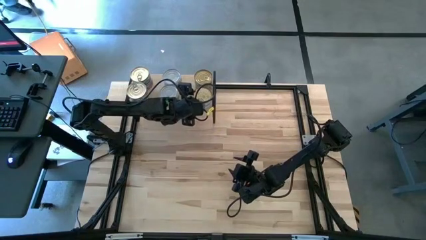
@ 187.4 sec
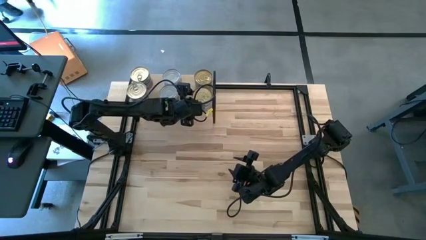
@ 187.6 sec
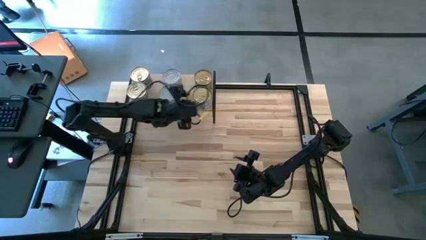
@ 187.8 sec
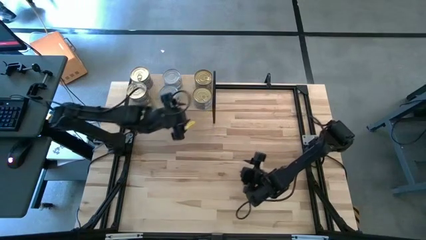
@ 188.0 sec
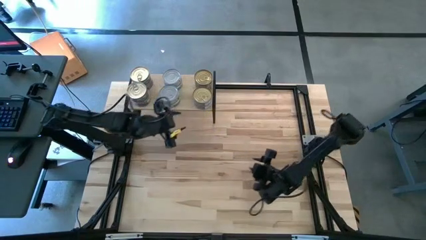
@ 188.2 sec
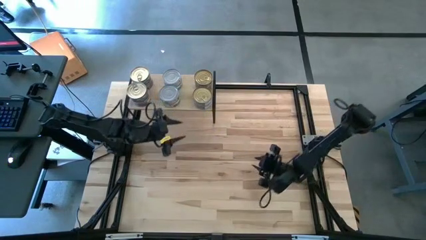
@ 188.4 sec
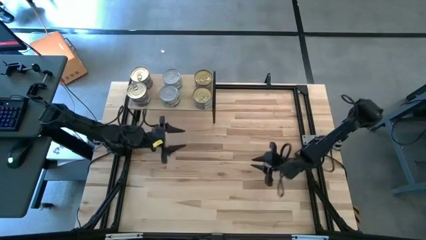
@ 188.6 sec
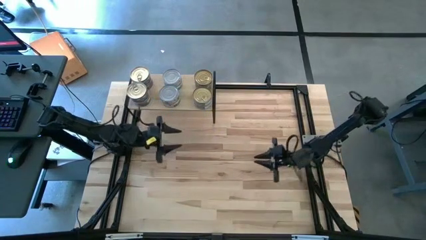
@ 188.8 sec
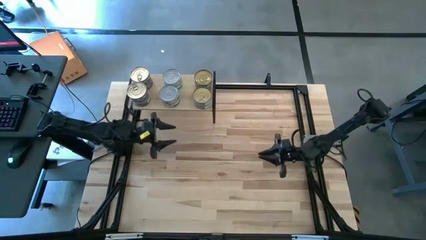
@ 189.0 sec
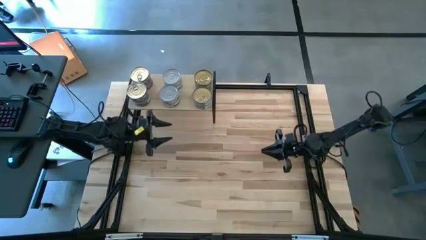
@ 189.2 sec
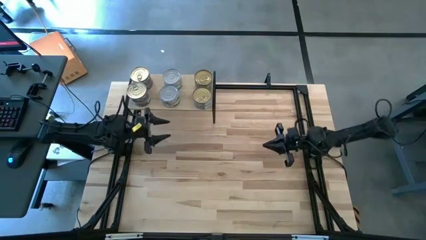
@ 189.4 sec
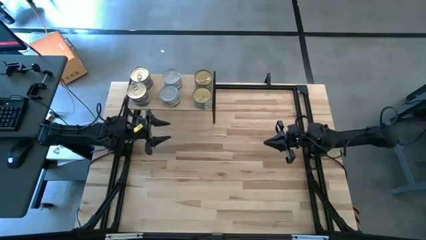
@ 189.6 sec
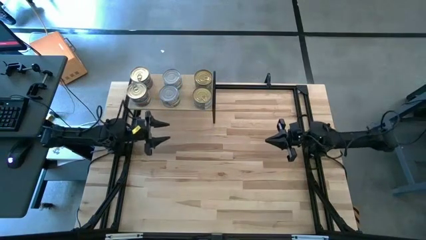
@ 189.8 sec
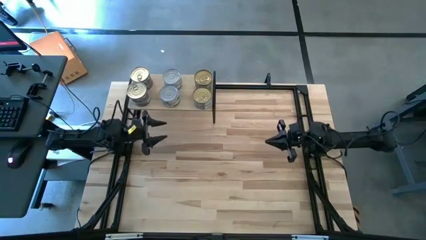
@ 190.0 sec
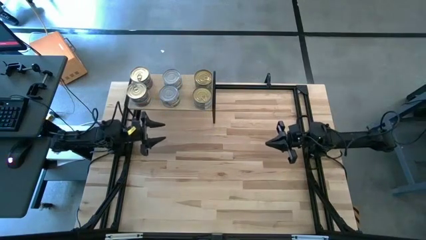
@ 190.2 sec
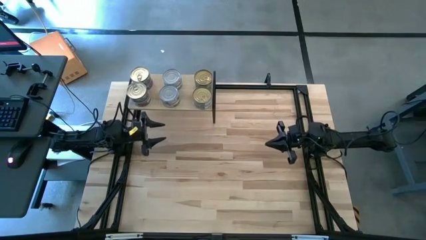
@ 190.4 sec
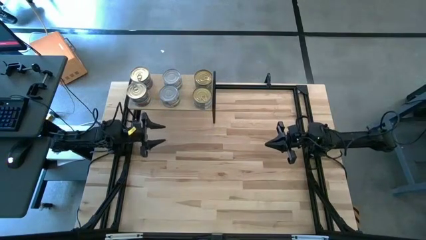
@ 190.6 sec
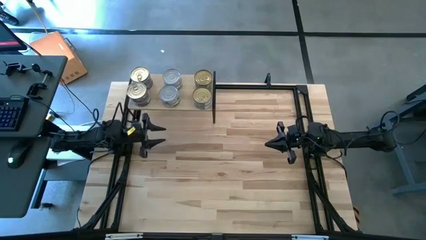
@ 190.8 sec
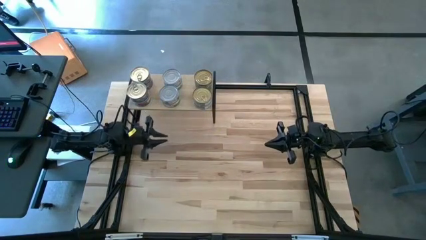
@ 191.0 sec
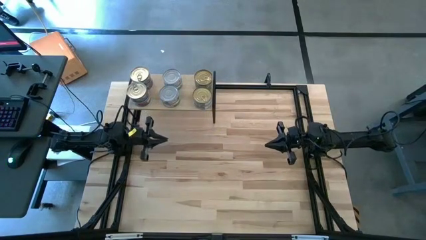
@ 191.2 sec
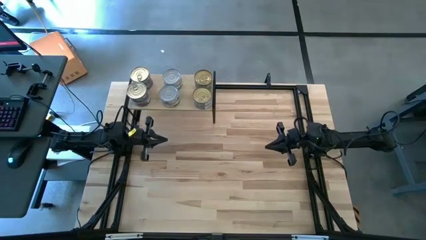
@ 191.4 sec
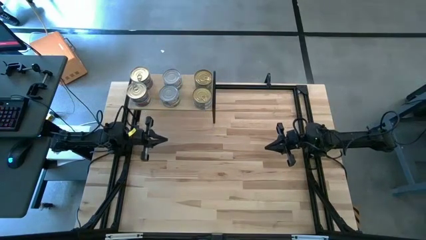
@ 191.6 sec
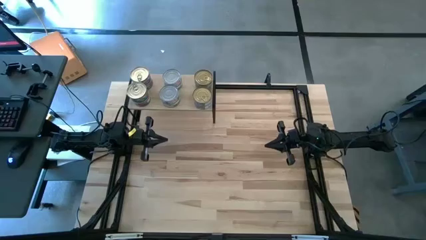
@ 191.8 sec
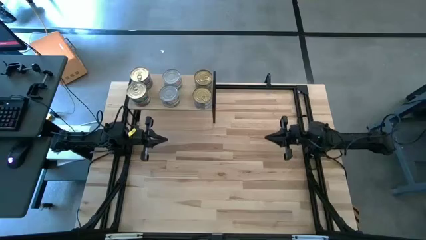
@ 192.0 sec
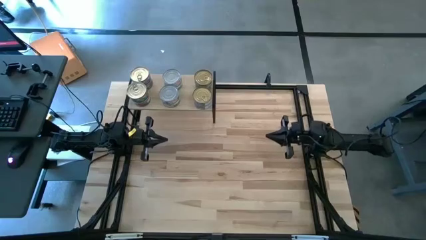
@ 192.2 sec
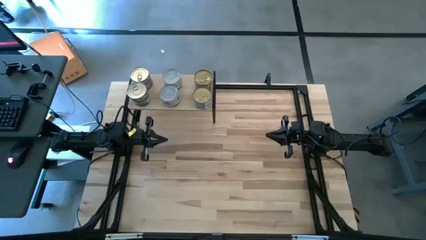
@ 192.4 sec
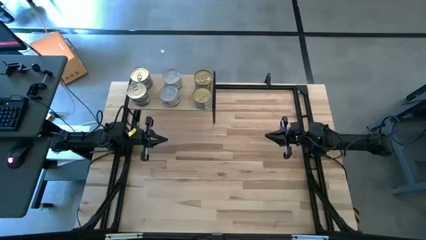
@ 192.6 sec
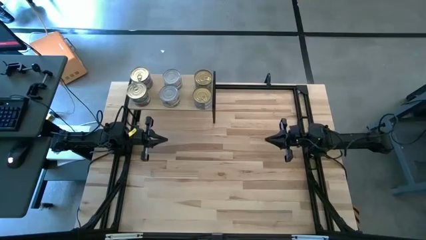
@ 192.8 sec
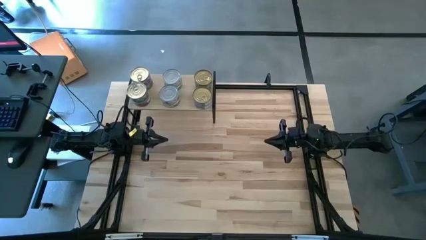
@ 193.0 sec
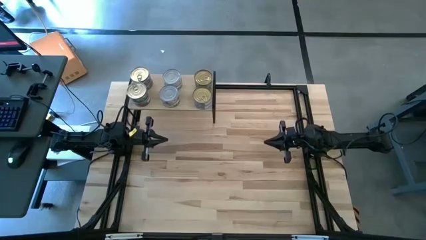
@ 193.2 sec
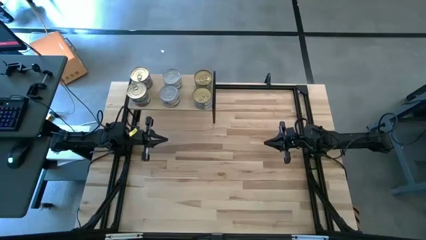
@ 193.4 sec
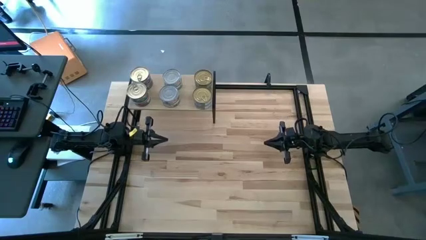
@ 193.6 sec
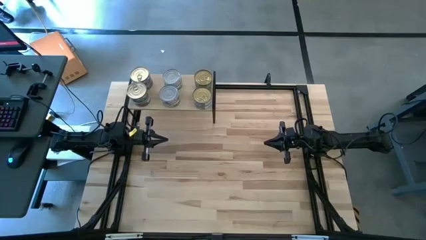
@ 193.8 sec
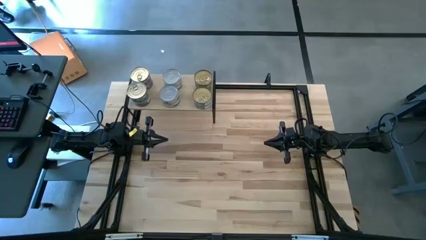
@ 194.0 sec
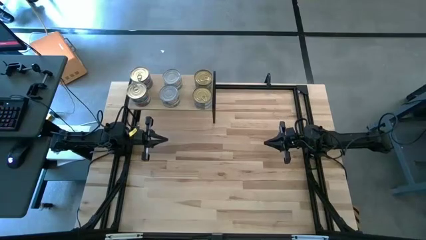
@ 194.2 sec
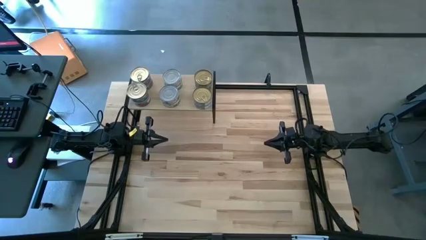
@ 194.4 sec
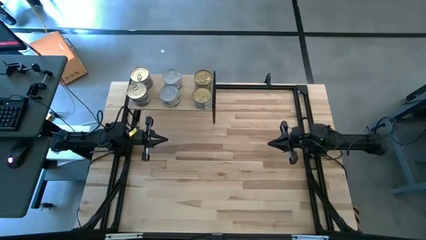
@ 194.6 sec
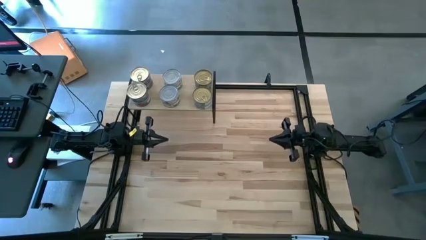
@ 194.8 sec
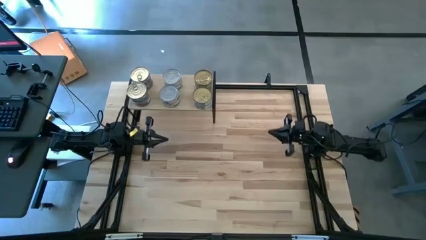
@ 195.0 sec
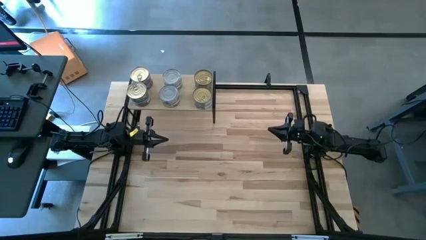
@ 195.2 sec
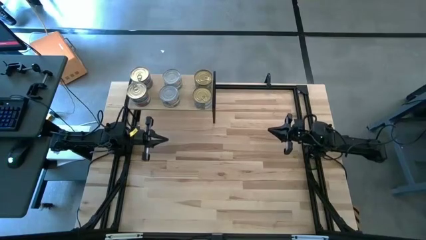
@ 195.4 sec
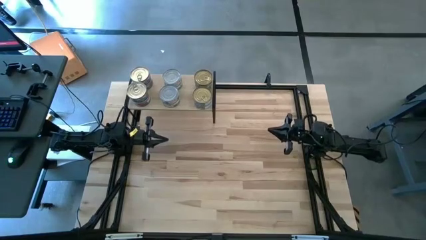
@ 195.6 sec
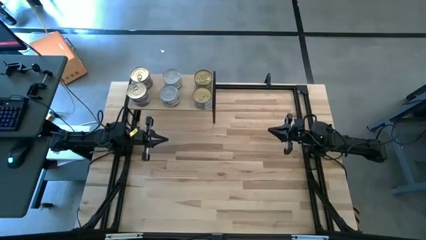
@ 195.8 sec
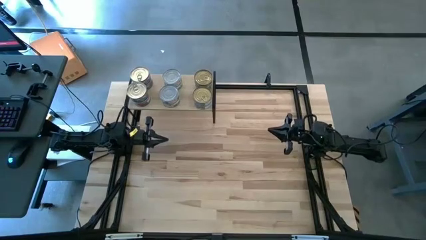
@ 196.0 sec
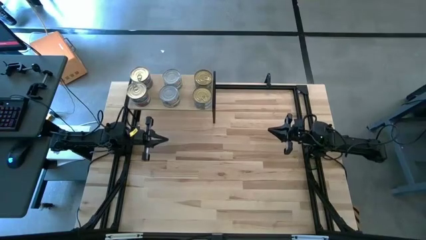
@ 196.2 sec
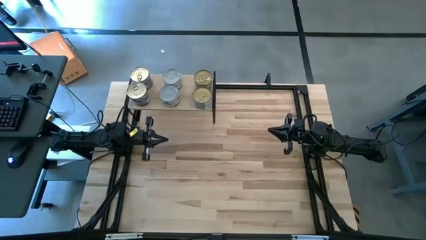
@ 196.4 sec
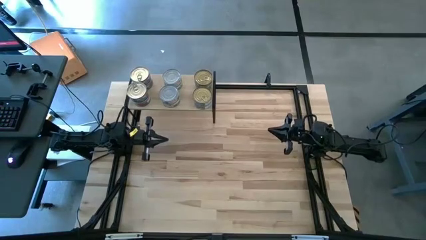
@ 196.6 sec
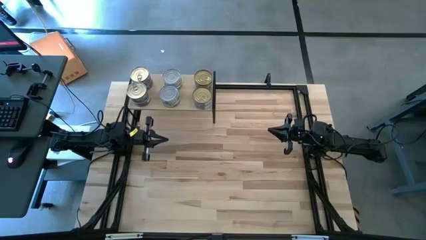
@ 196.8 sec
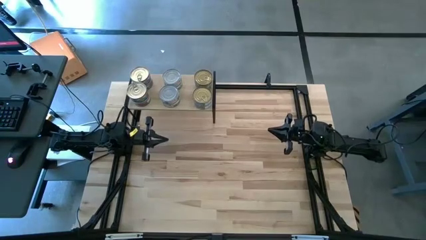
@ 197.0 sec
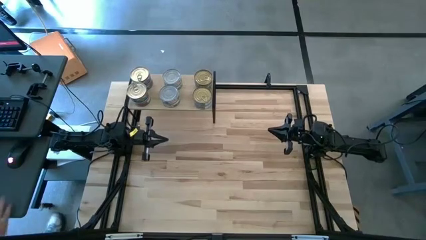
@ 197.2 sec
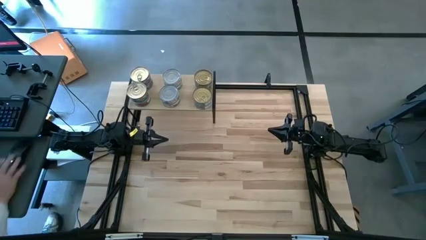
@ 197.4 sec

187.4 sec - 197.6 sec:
Task: Stack canned seafood by type on shelf
Return to Home Position

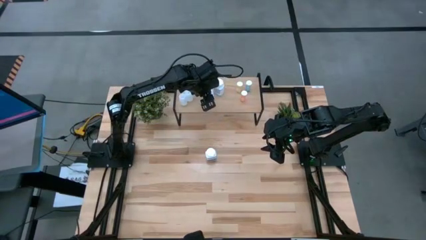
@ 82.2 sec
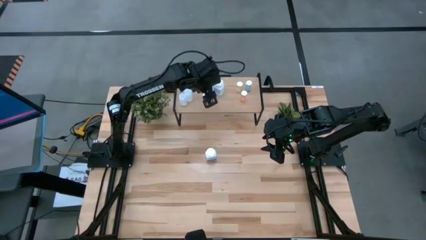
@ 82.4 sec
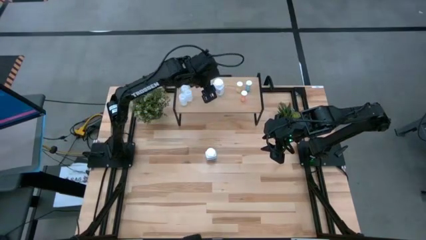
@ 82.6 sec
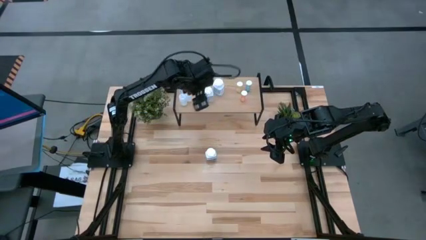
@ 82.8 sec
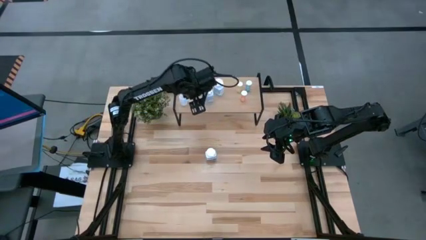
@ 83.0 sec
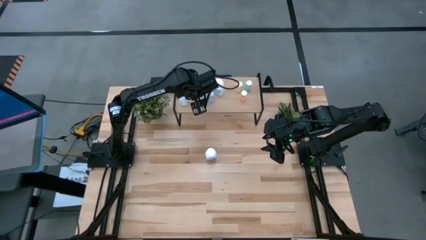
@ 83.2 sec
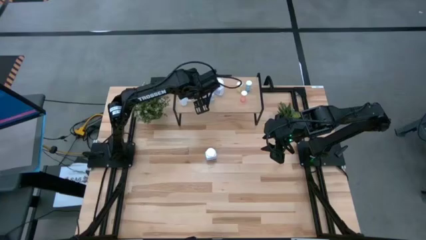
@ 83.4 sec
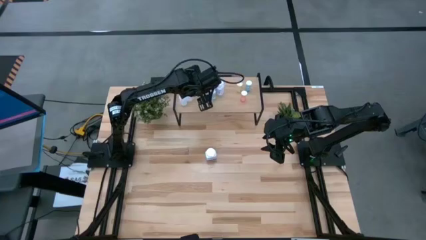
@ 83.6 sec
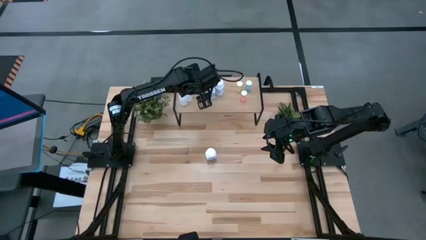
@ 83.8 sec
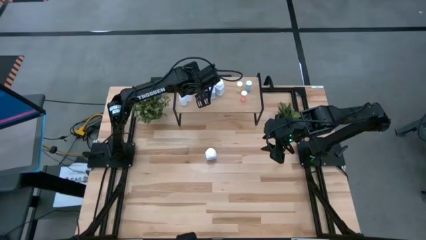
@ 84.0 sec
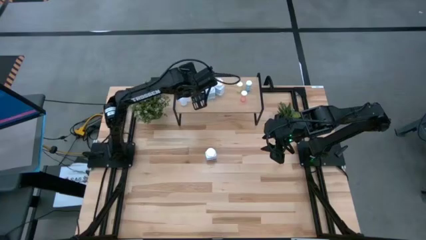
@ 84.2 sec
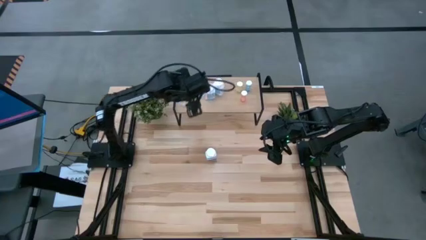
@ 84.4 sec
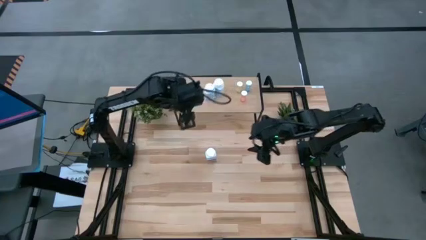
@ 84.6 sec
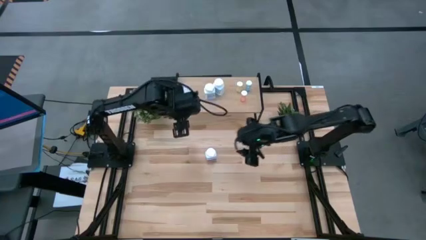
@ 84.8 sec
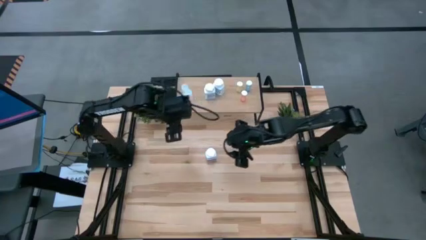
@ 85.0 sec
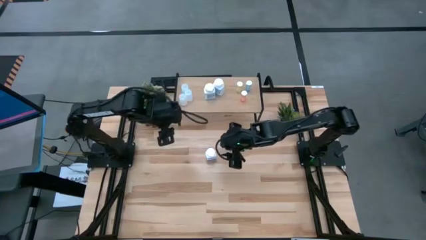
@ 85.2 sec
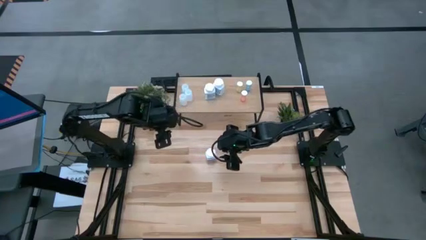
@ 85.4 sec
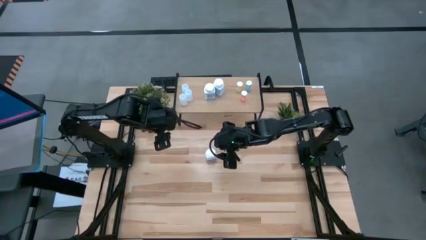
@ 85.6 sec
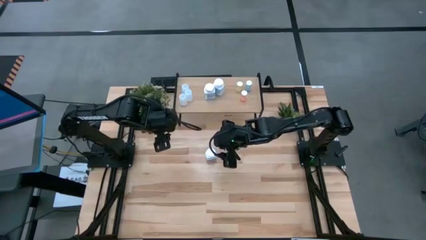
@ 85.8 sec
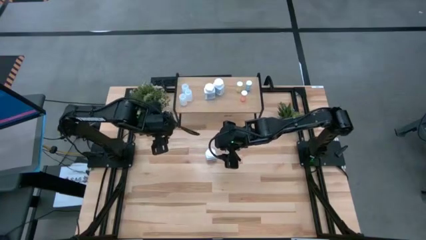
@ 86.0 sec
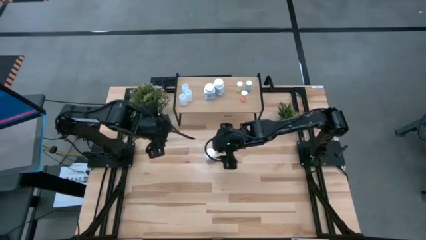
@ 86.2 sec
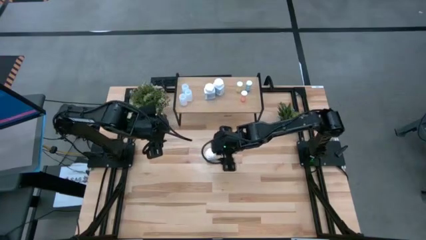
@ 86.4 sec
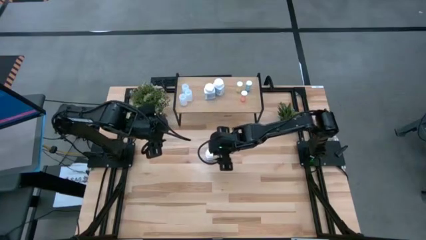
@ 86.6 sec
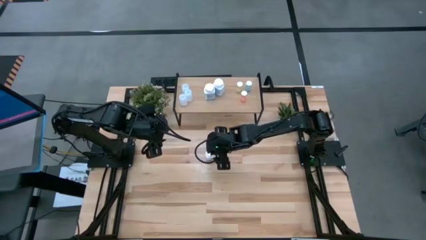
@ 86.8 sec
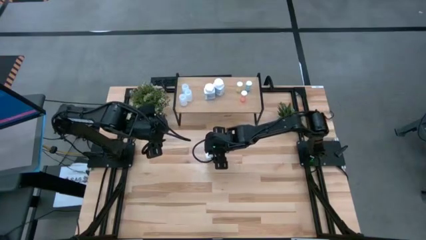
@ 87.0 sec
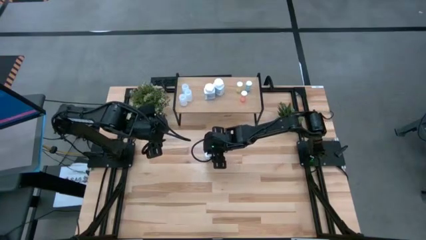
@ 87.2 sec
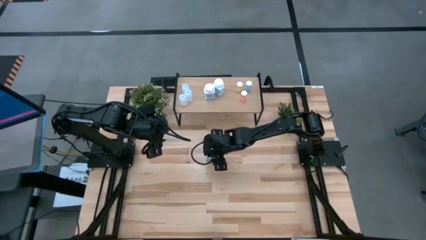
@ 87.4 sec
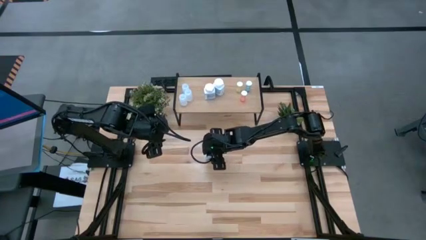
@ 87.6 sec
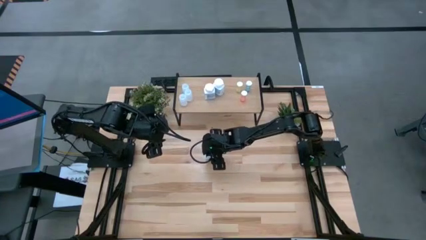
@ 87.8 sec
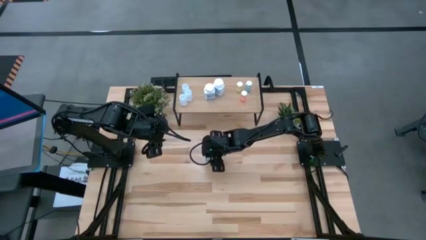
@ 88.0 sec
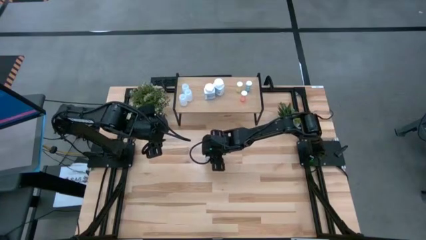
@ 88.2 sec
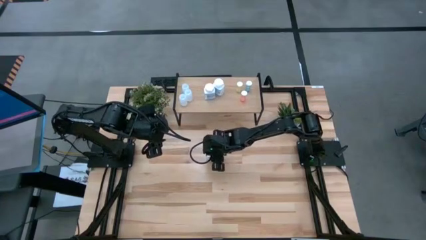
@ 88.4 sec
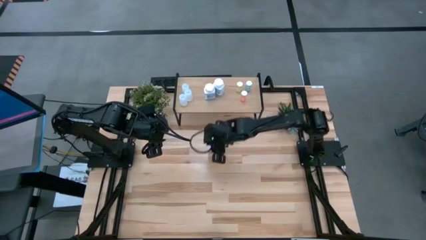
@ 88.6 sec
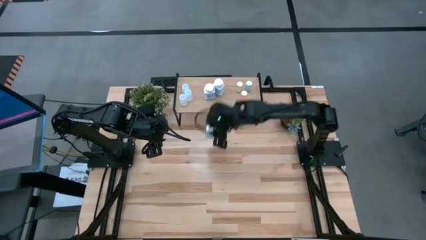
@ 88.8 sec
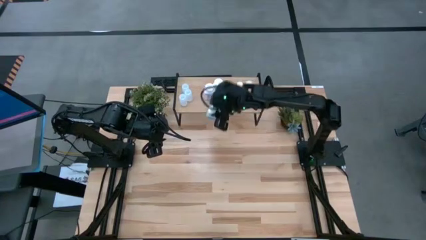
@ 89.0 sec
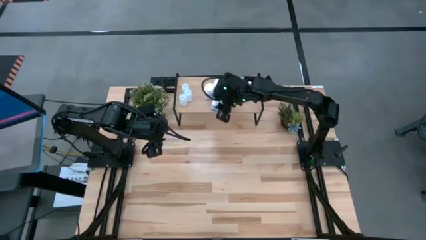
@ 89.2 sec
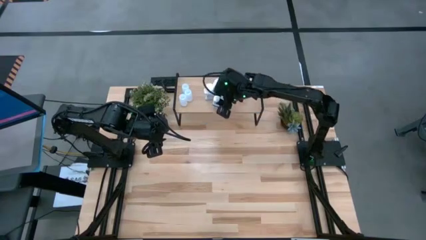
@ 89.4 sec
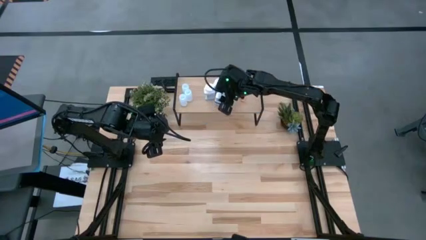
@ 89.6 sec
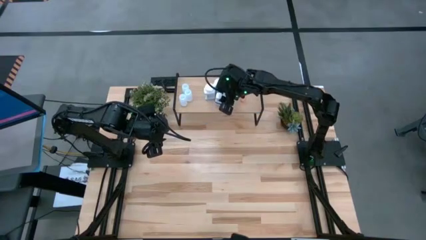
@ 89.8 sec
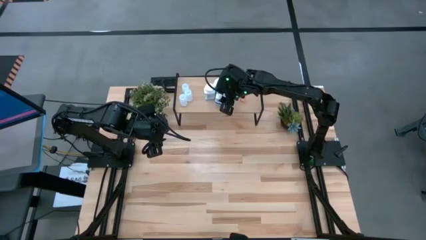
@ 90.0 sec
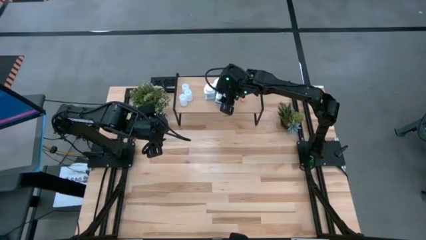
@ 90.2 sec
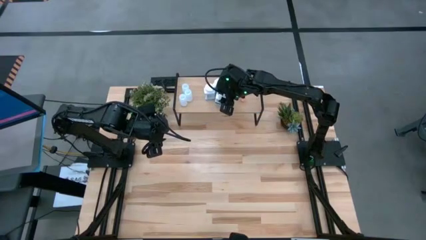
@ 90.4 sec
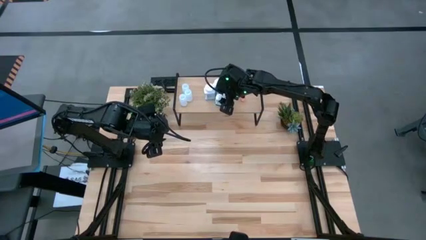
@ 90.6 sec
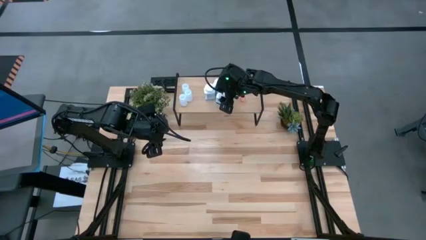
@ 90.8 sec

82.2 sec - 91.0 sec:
Task: Pick and place medicine bottles onto shelf by color
Put the white blue pill bottle on the shelf
